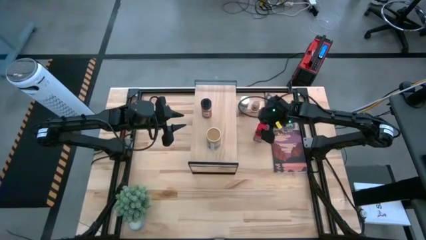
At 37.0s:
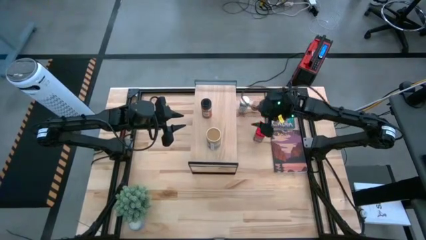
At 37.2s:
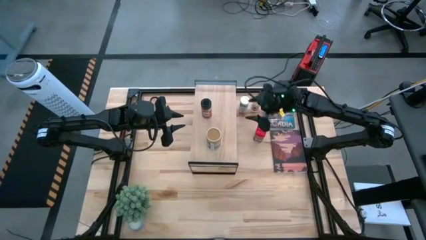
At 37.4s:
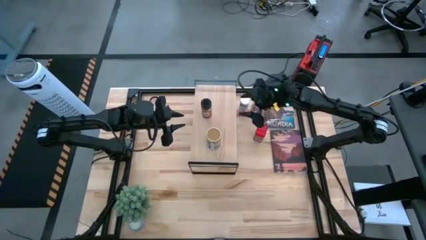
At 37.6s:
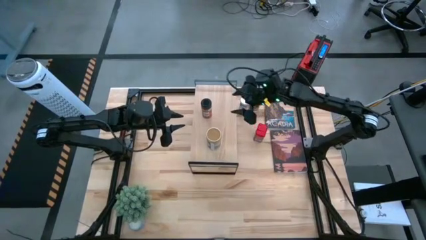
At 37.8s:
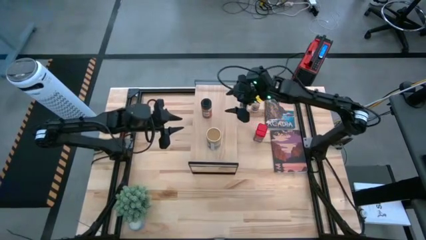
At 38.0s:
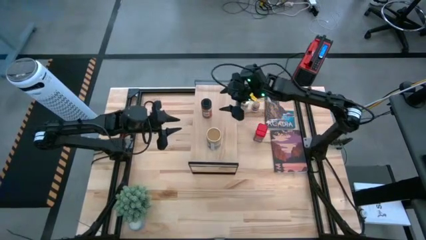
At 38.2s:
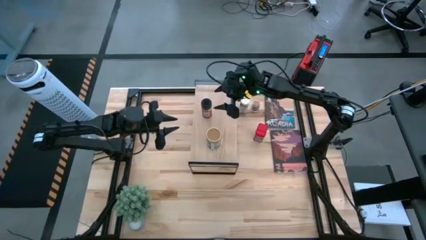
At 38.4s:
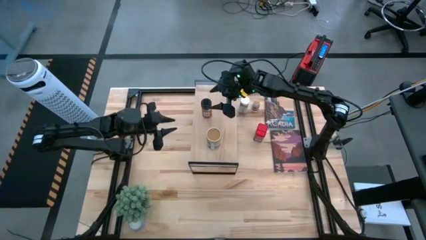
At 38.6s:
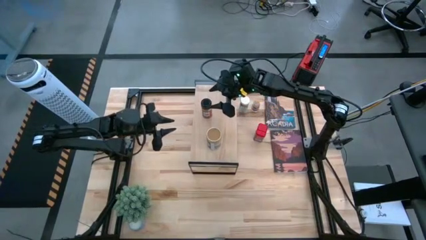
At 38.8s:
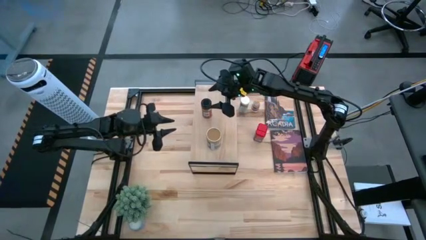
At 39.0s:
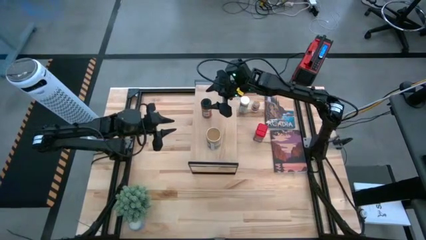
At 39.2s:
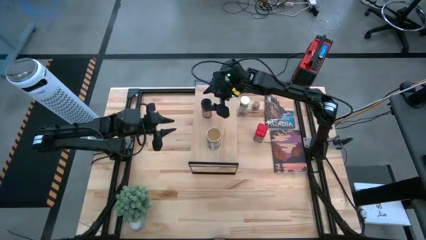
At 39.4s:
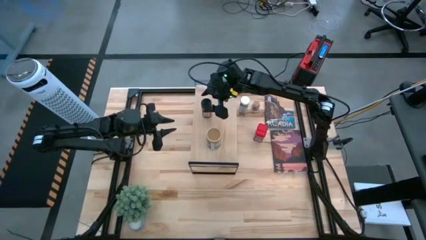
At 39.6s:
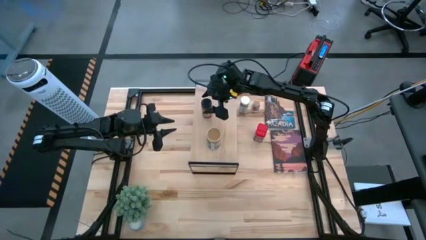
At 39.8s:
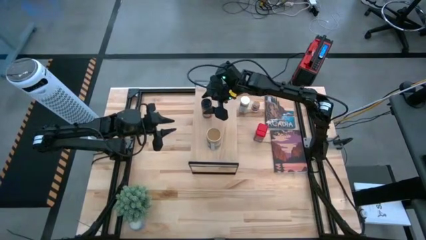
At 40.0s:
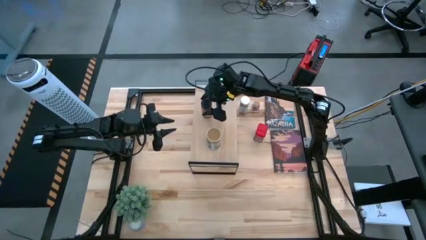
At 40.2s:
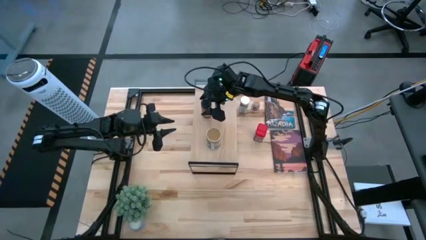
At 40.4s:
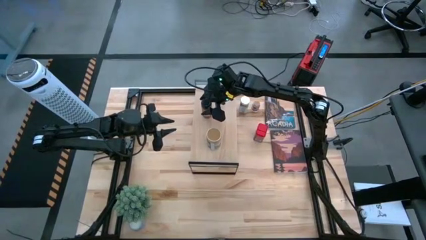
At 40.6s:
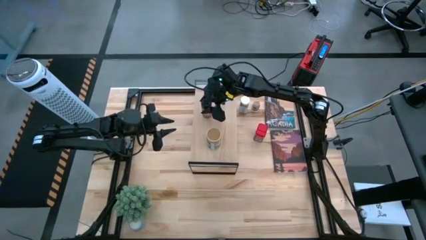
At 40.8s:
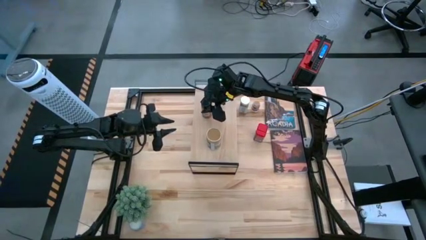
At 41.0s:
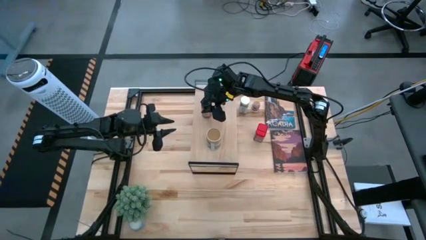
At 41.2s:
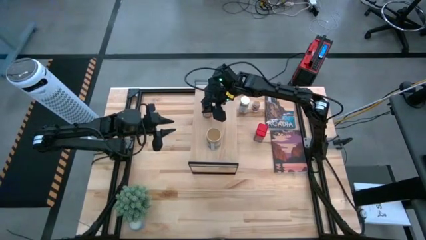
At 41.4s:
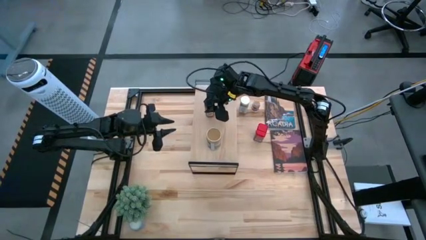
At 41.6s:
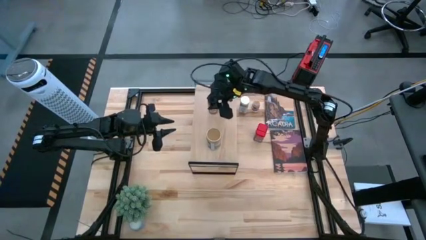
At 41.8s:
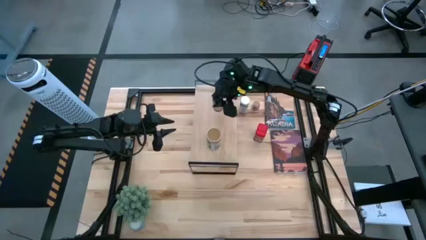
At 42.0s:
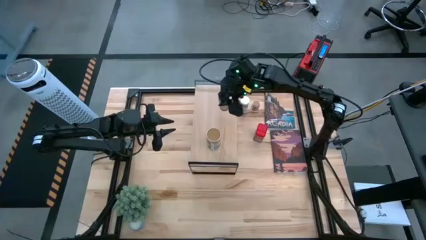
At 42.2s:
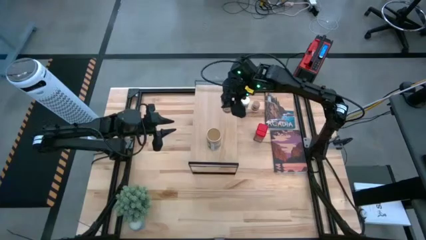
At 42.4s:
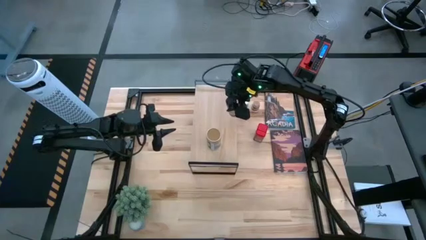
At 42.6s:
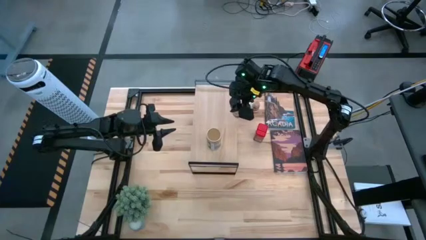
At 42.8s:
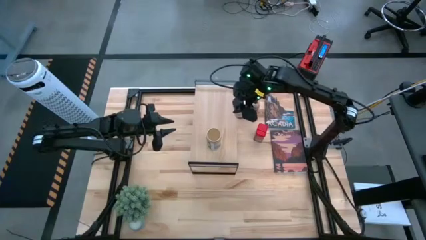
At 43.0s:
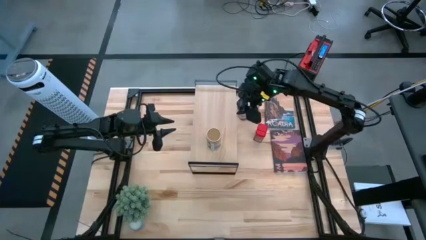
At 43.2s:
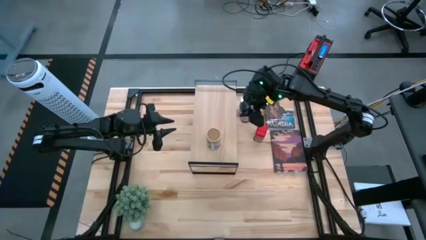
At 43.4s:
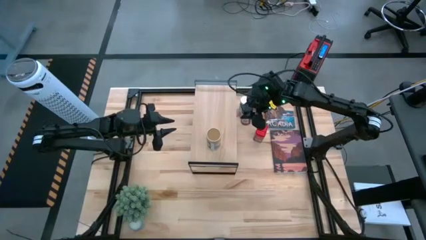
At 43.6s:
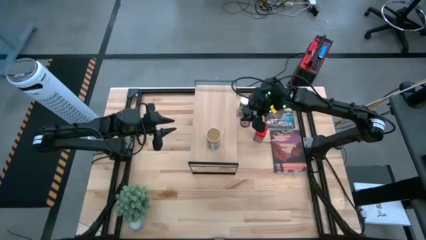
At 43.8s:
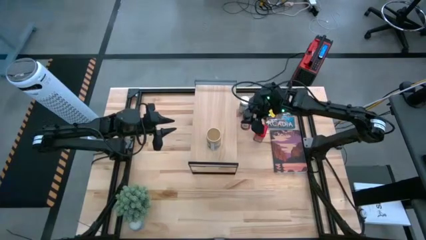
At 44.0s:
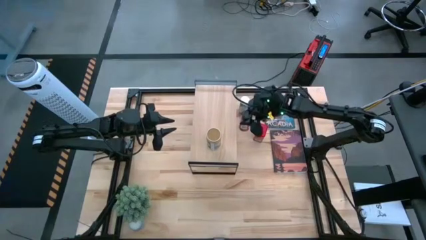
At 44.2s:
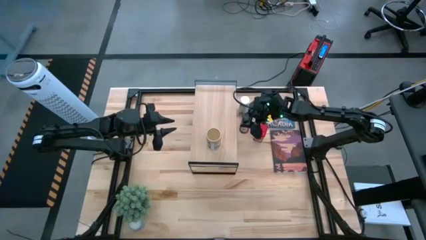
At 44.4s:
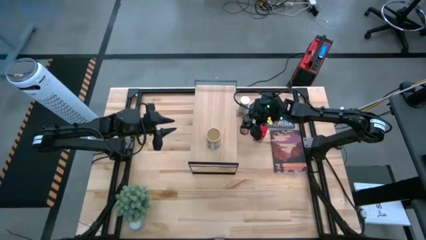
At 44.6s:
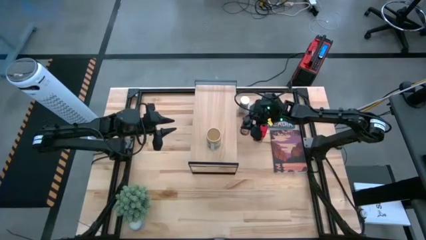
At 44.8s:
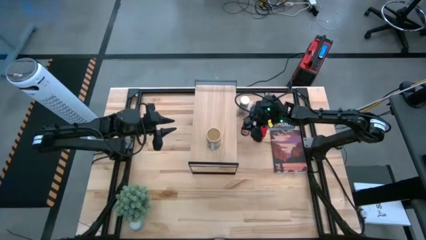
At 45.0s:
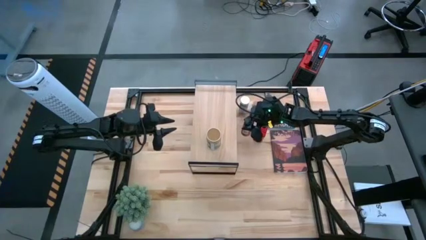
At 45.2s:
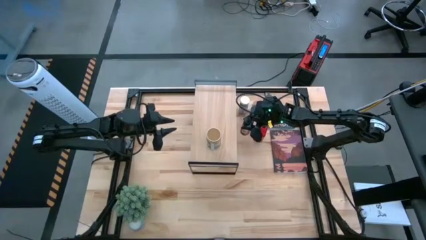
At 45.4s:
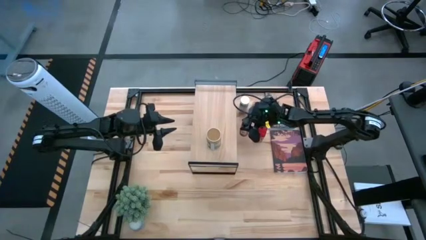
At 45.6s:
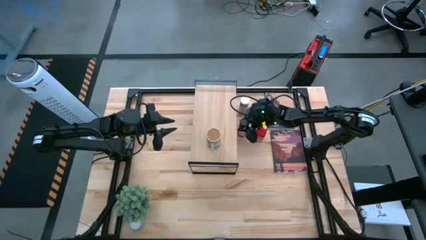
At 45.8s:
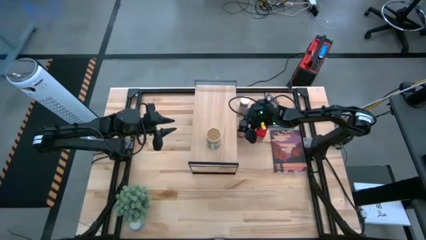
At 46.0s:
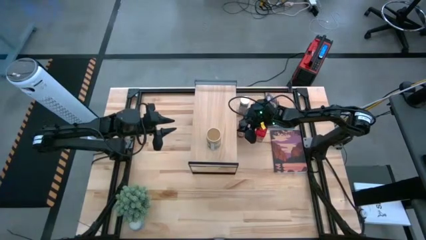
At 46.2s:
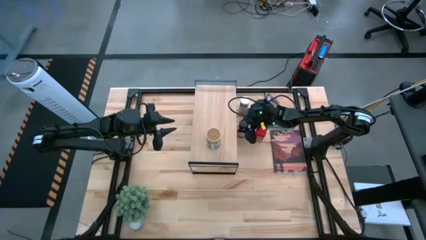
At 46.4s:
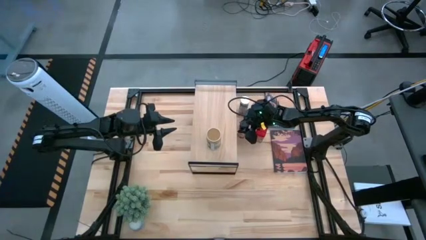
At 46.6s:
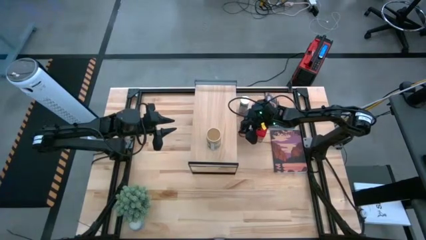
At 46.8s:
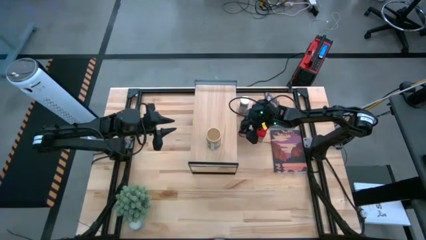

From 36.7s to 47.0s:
Task: Shelf spices
Remove the black seasoning bottle from the shelf

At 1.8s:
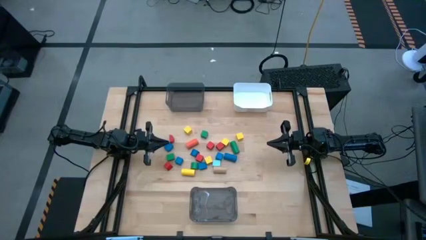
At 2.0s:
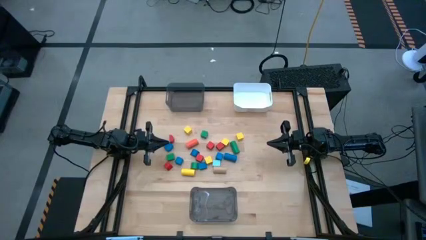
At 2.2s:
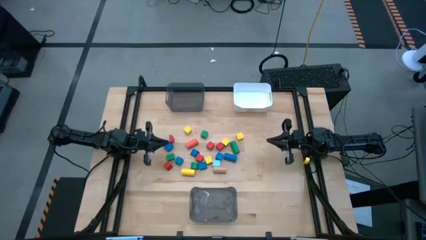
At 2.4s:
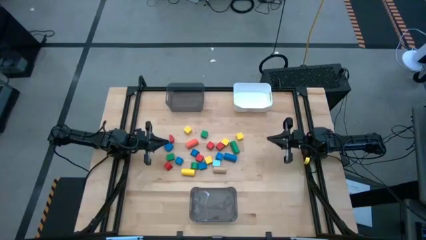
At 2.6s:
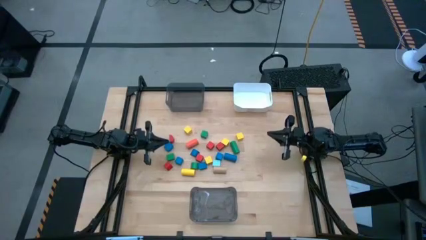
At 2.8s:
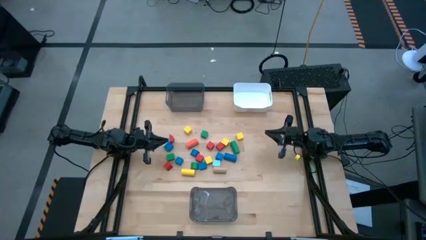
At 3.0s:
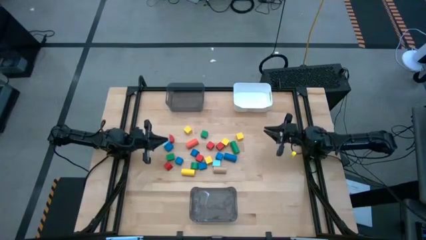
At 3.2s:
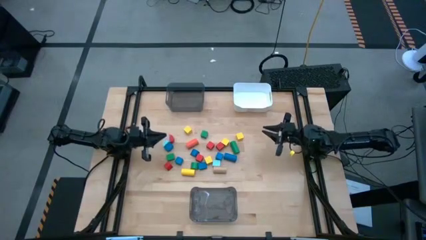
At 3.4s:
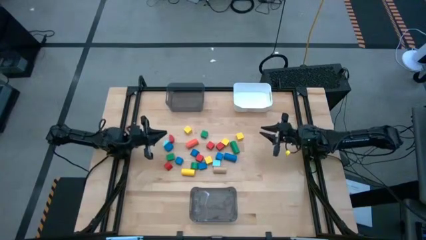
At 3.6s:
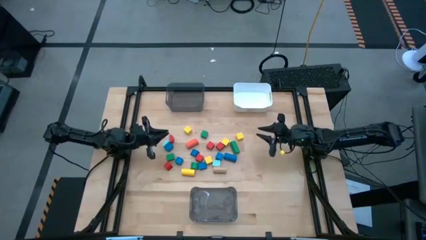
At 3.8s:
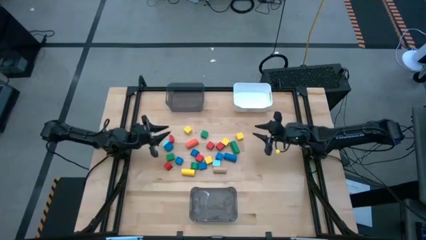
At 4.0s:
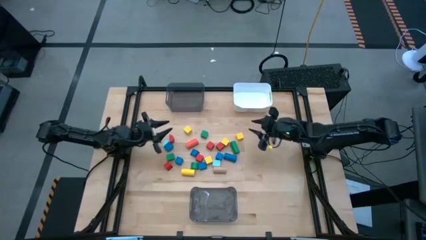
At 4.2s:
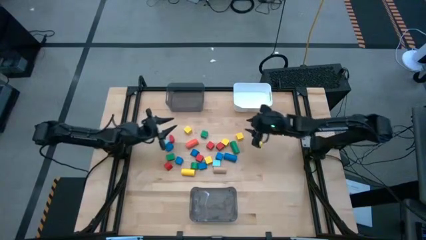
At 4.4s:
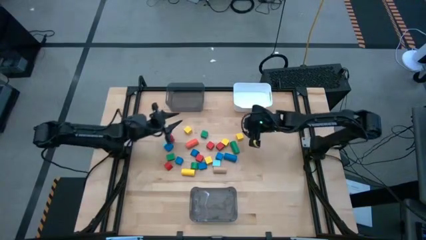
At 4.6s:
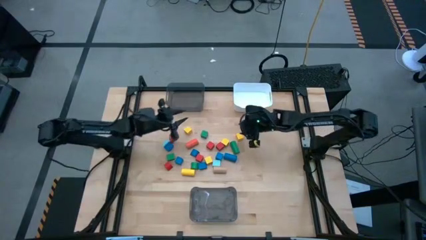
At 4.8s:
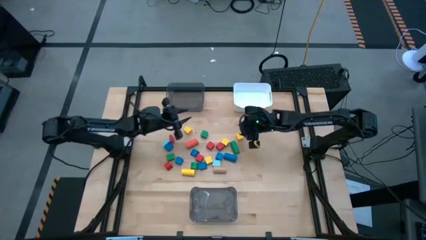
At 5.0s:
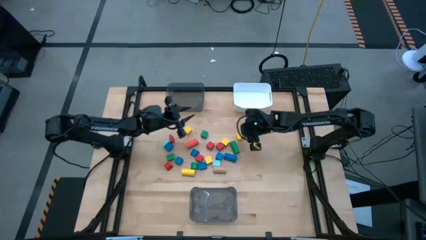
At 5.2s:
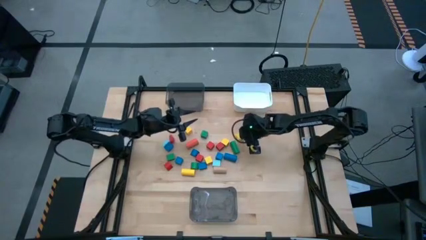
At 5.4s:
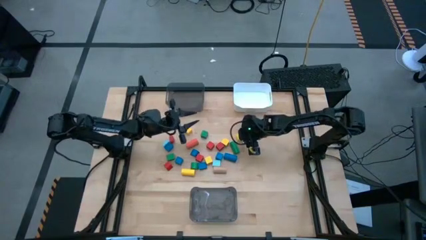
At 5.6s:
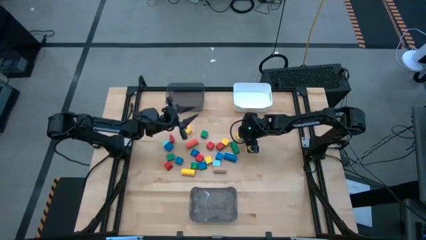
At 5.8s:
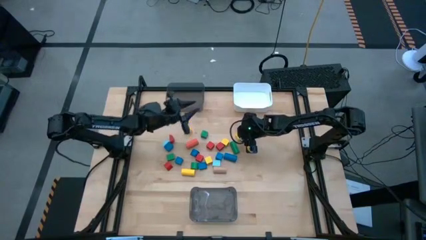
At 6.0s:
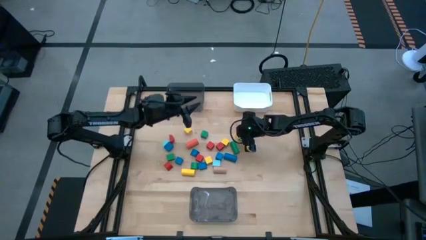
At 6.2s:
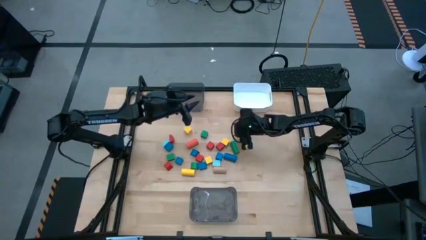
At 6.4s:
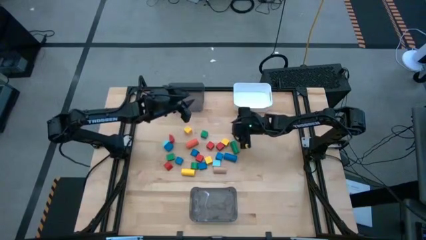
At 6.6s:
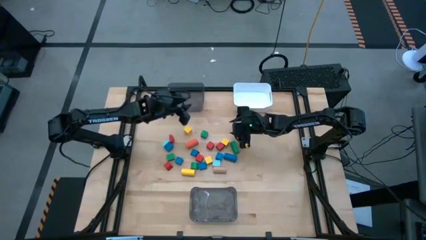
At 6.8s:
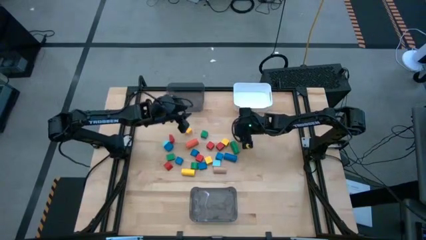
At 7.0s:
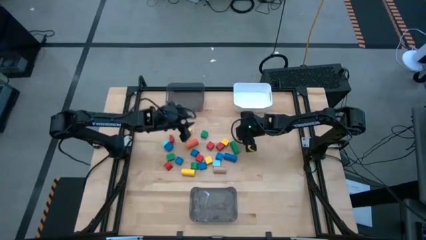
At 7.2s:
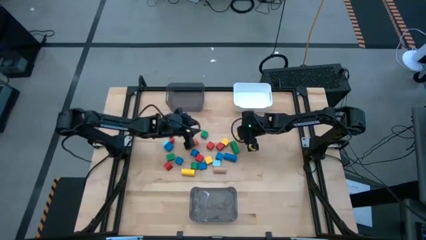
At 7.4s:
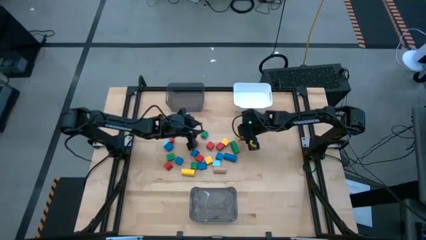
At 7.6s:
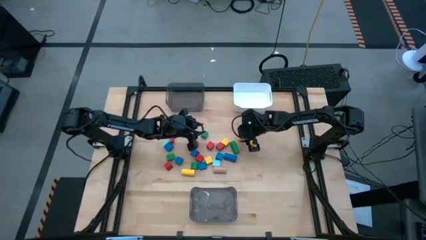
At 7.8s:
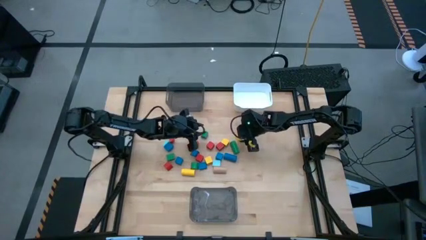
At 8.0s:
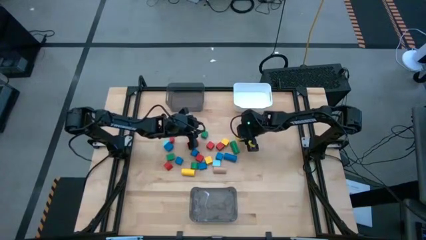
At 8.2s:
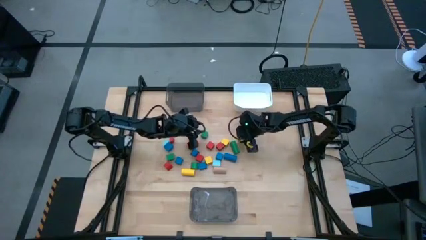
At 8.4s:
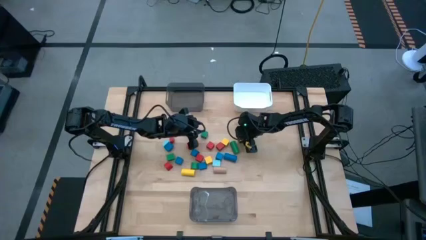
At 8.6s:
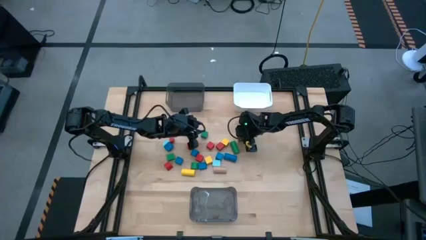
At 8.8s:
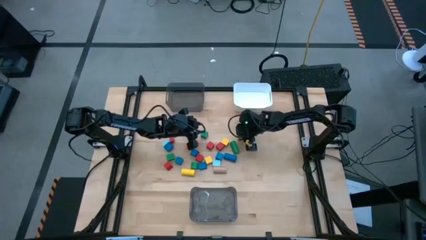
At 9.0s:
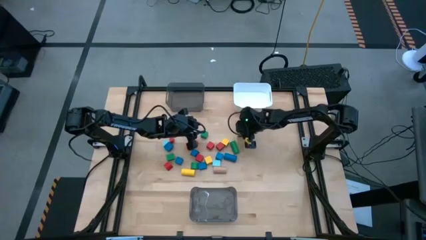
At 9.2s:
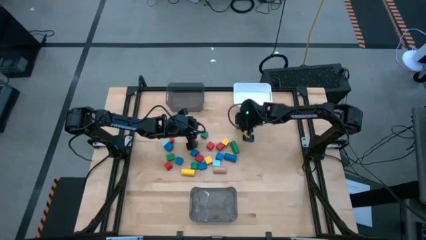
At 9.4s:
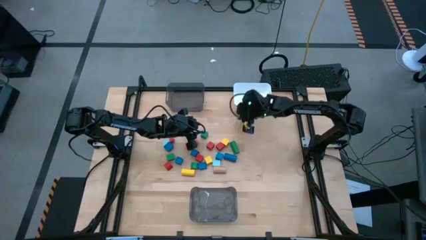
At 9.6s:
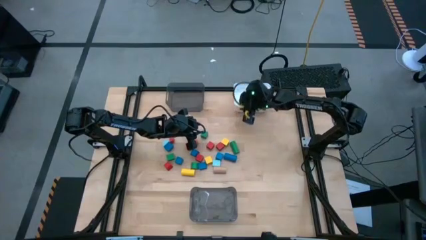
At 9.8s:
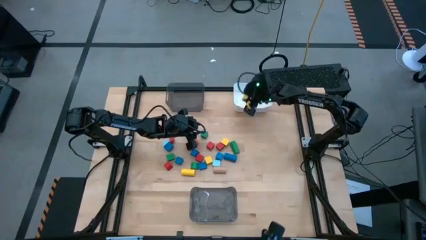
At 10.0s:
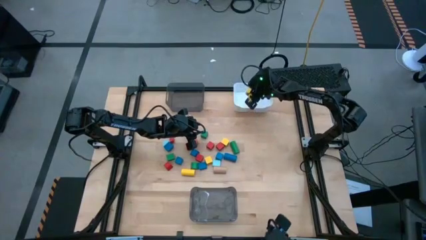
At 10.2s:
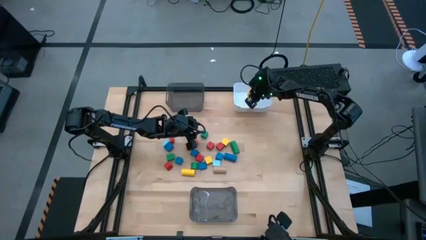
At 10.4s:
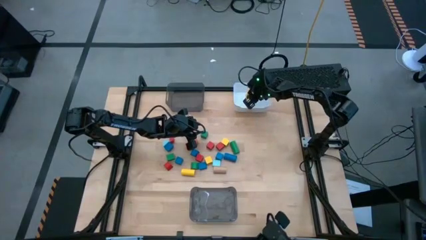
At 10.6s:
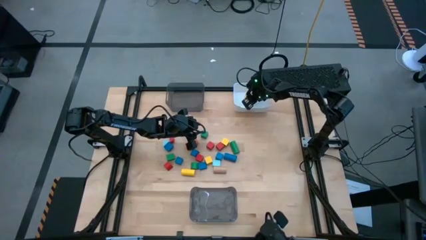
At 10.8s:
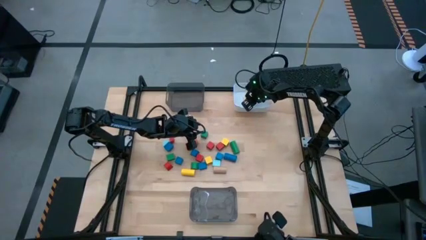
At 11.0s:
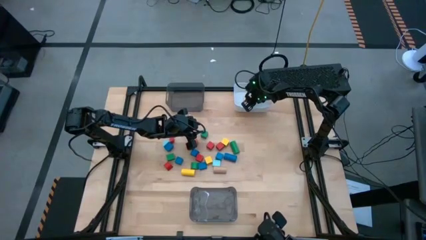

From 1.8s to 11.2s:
Task: Sort blocks by size
Put the yellow square block into the white bin
